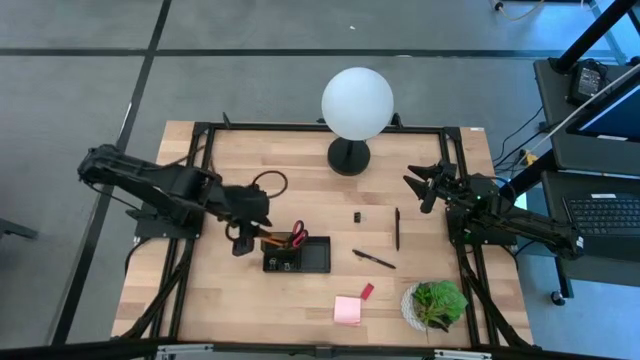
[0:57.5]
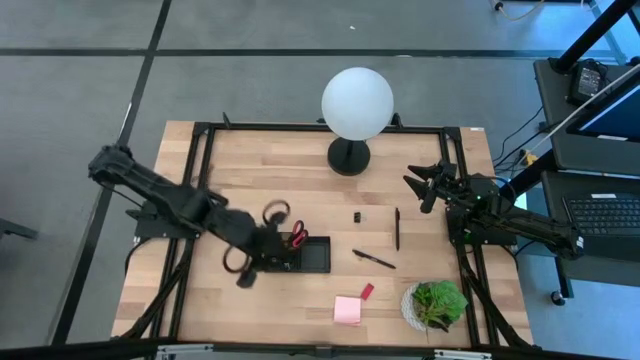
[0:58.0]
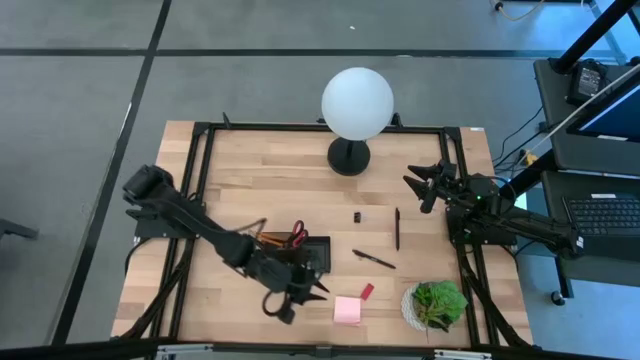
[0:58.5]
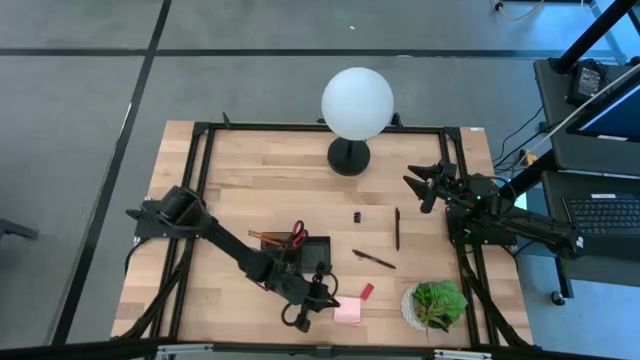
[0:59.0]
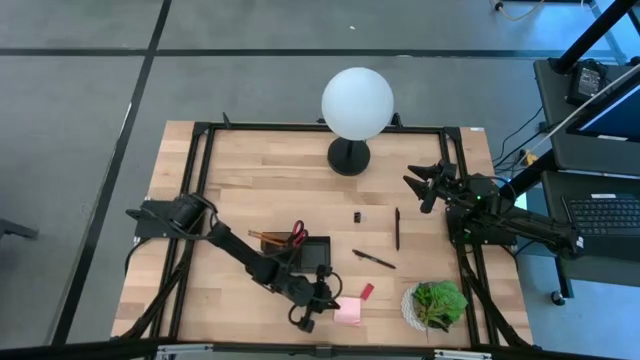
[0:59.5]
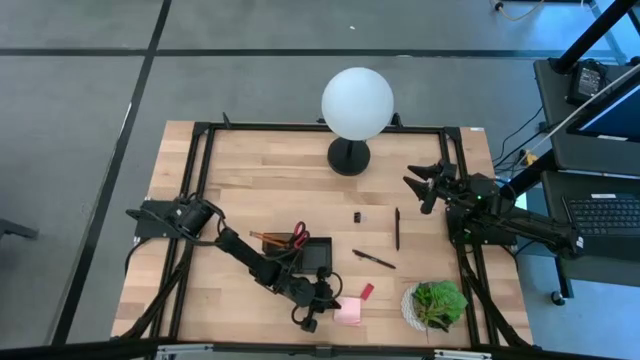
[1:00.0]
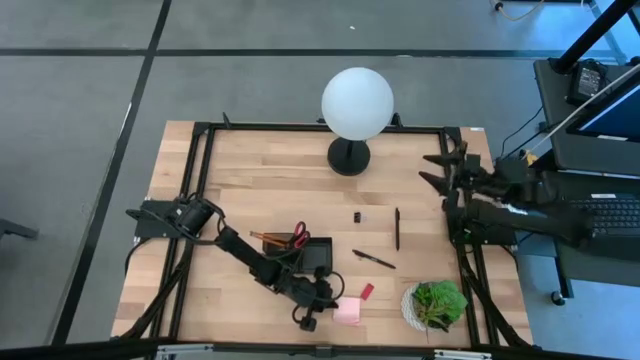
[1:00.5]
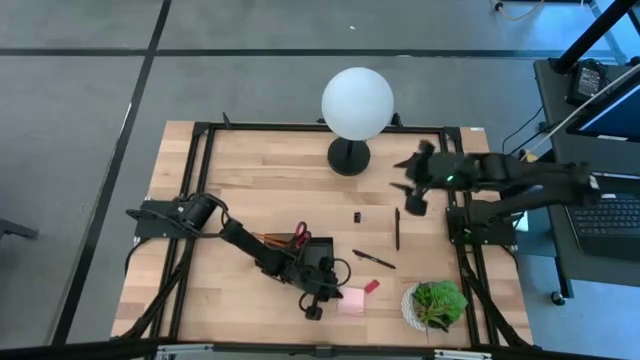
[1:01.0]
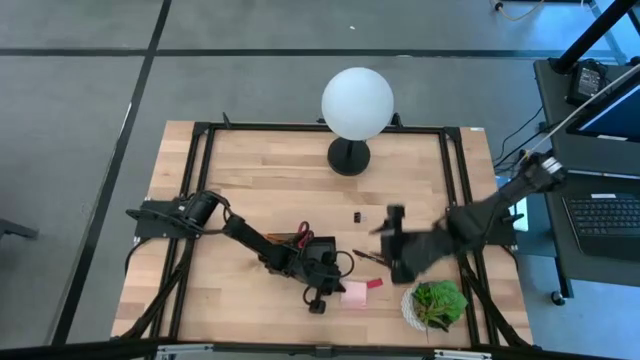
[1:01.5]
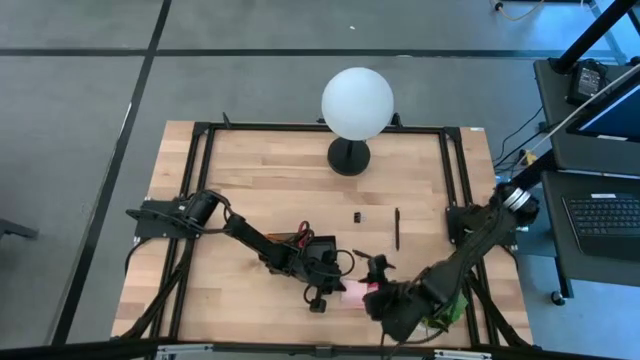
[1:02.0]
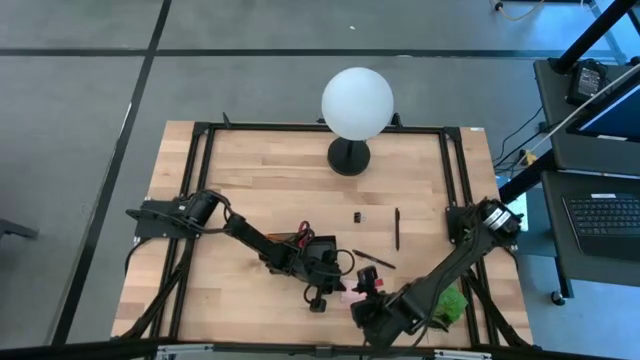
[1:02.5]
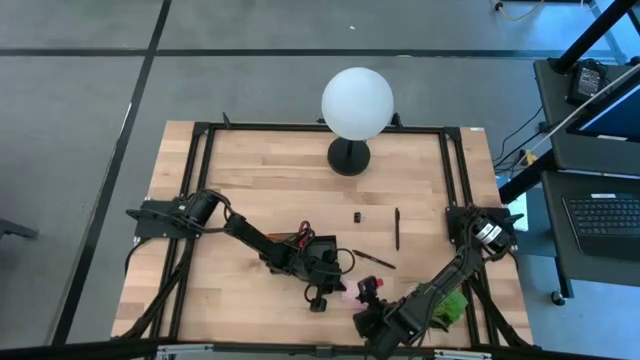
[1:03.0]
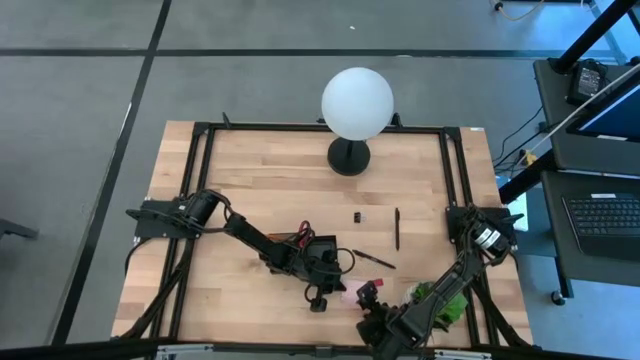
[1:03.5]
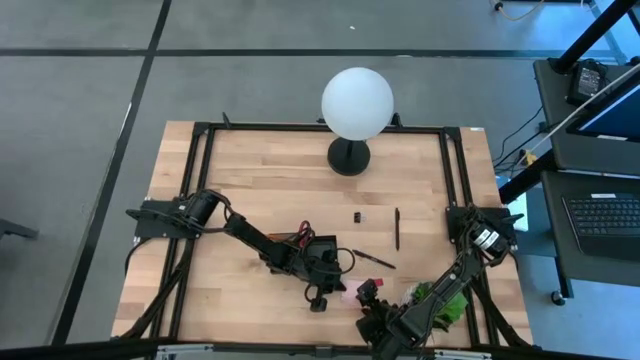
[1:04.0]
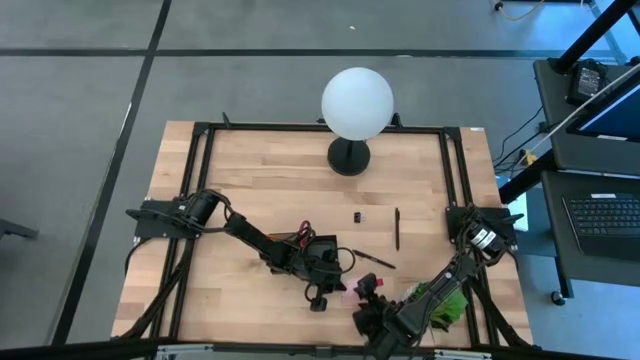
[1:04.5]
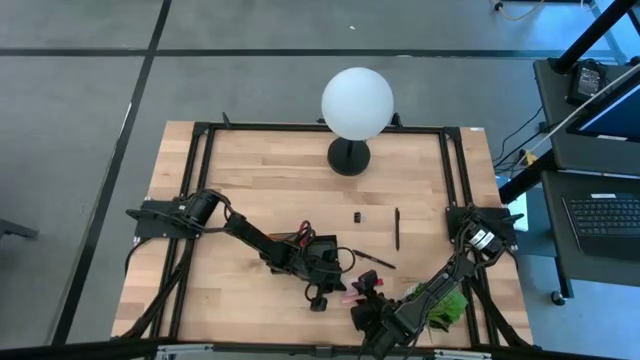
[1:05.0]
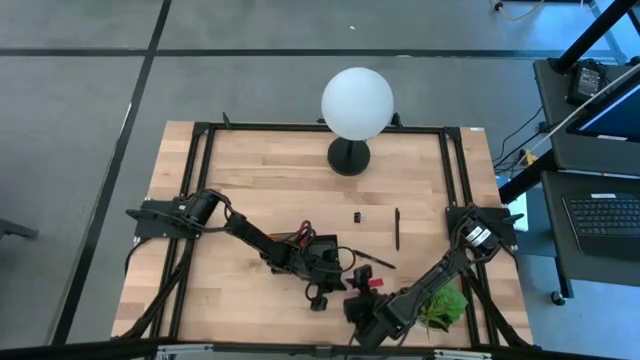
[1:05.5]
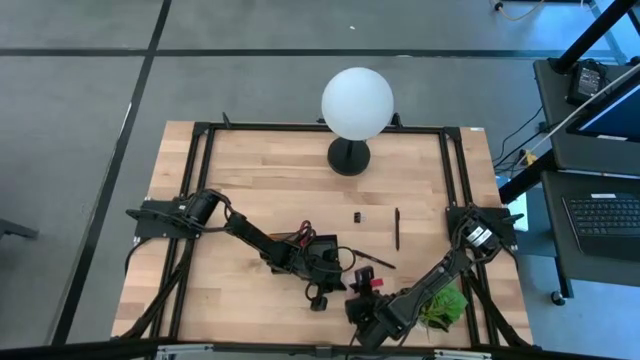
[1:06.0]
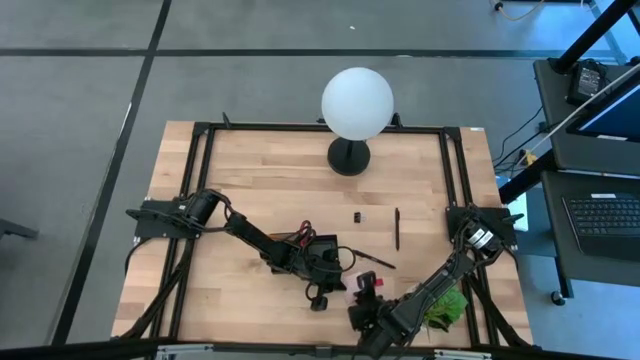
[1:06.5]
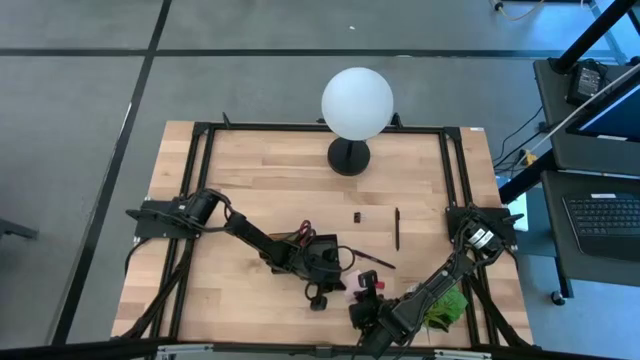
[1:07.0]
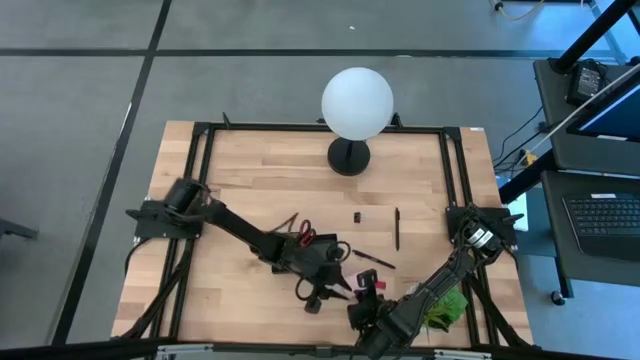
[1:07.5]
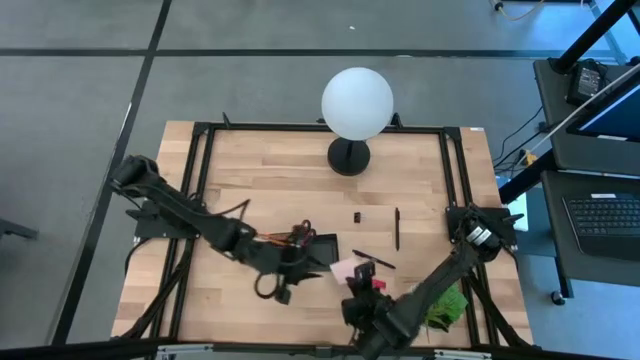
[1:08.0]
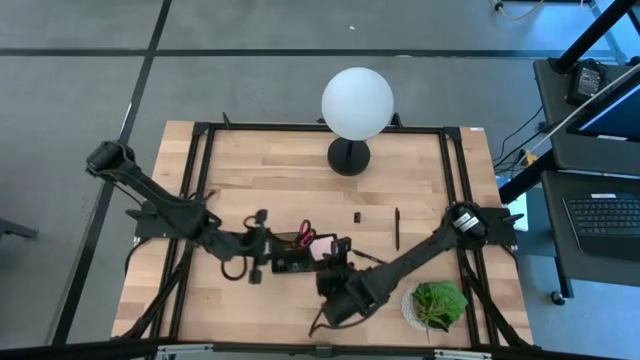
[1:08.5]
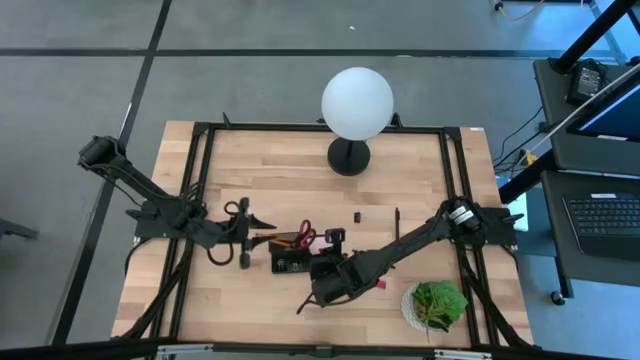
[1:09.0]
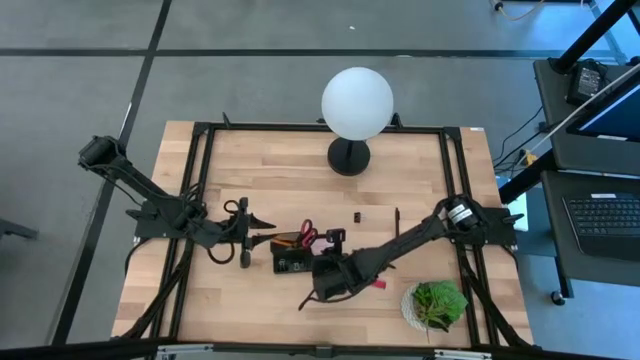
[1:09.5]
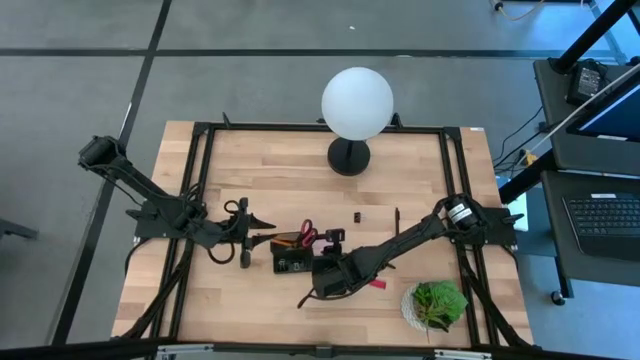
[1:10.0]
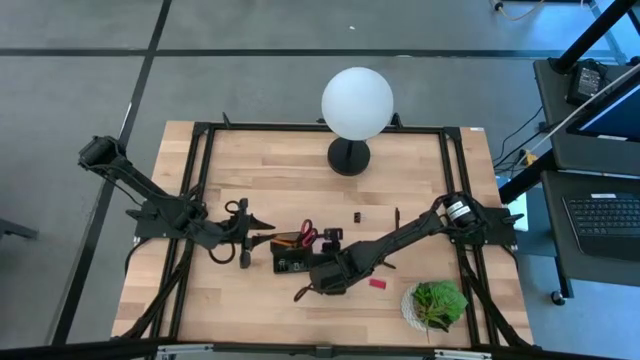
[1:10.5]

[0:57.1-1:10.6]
Task: Pick and place office supplies into organizer
Put the pink sticky notes into the black desk organizer

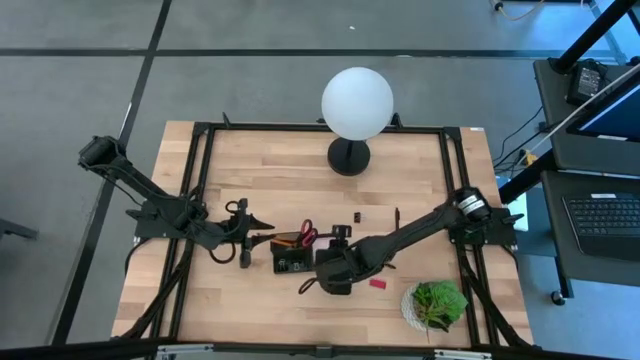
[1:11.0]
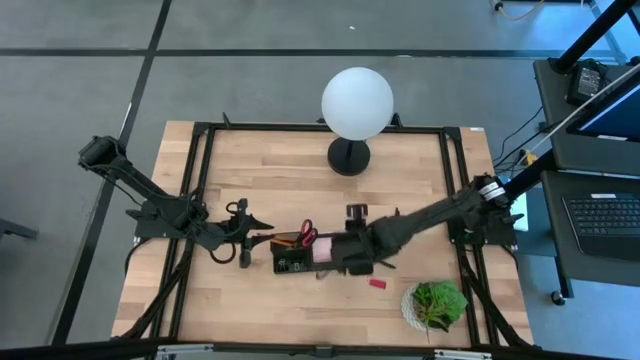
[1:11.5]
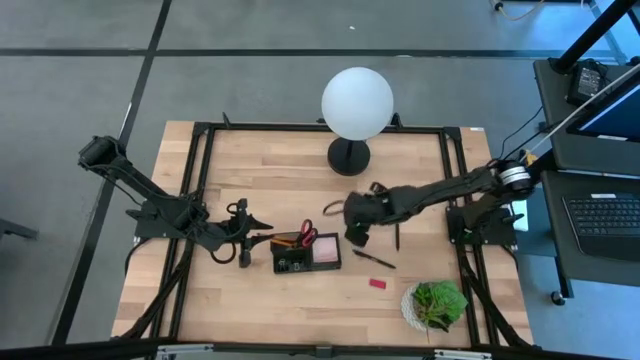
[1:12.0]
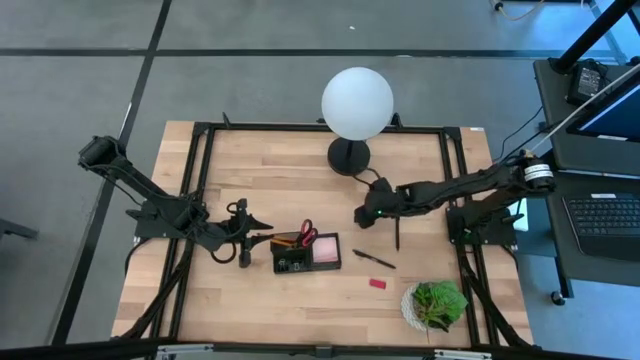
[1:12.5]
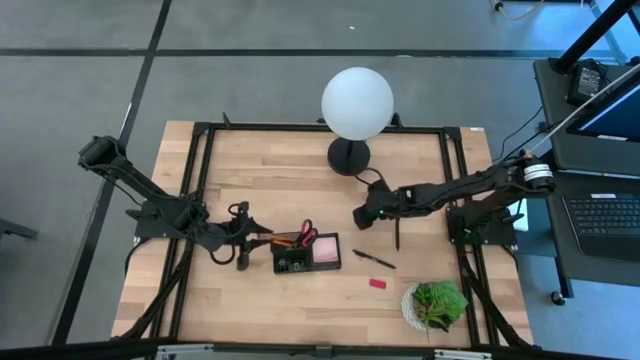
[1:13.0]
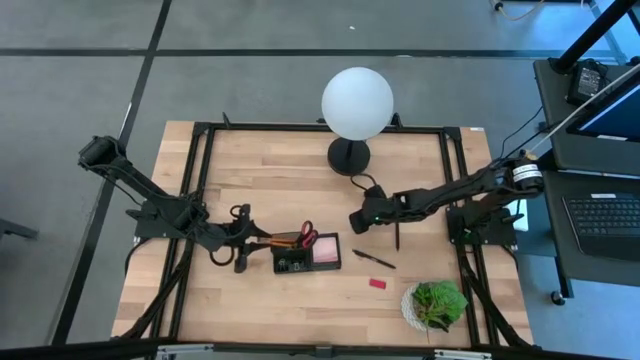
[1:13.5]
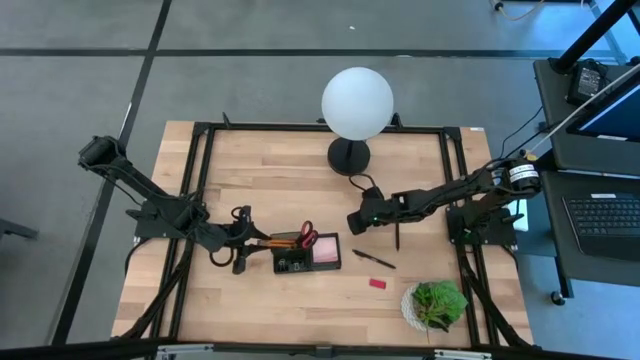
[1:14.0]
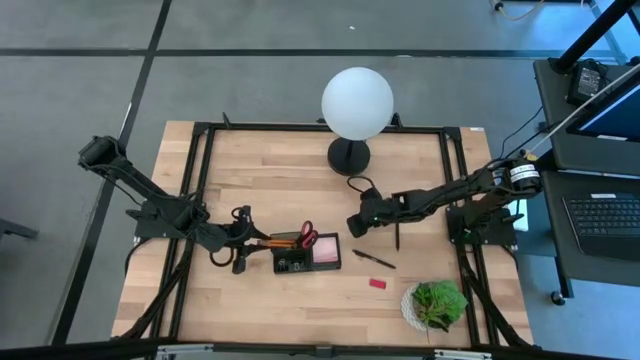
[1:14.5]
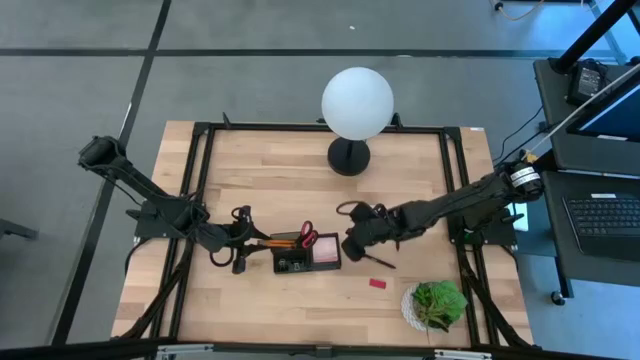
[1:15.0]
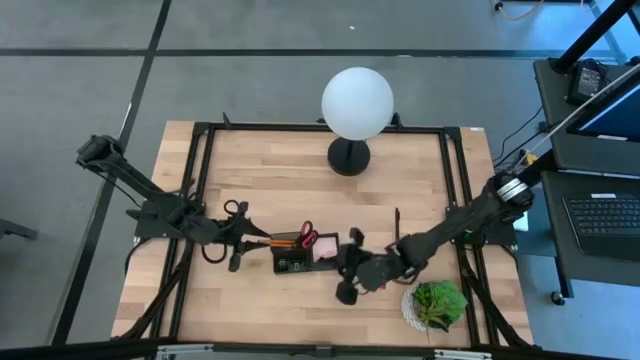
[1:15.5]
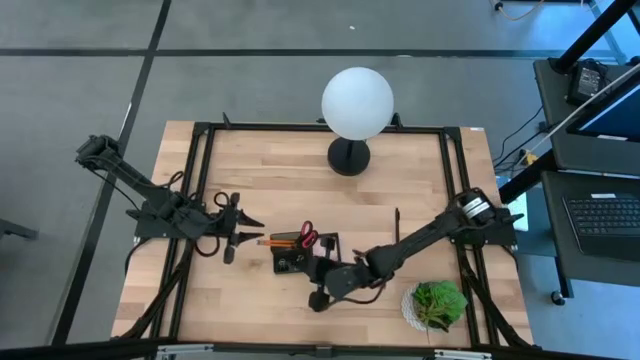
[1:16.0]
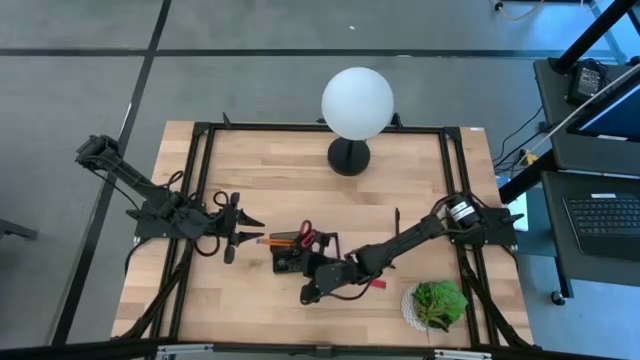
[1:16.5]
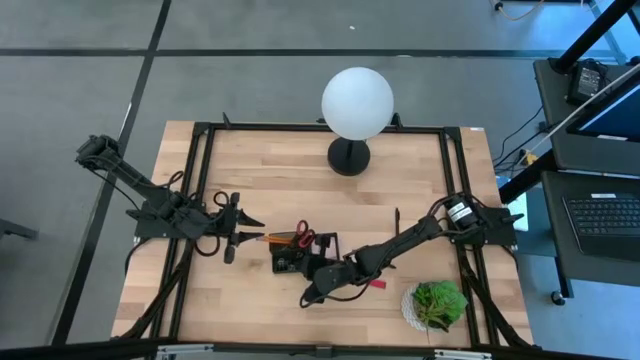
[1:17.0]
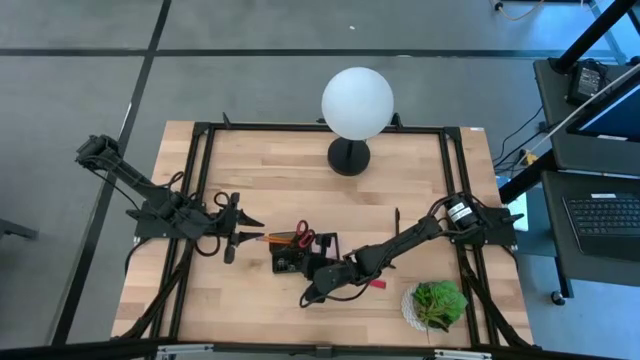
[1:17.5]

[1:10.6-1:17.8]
Put the black binder clip into the black desk organizer

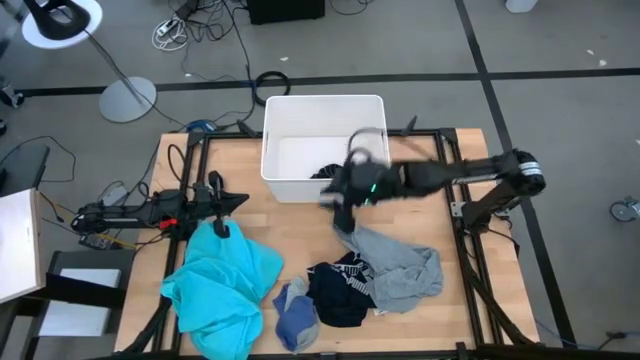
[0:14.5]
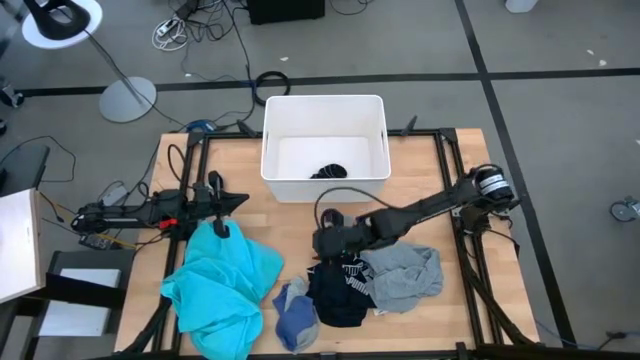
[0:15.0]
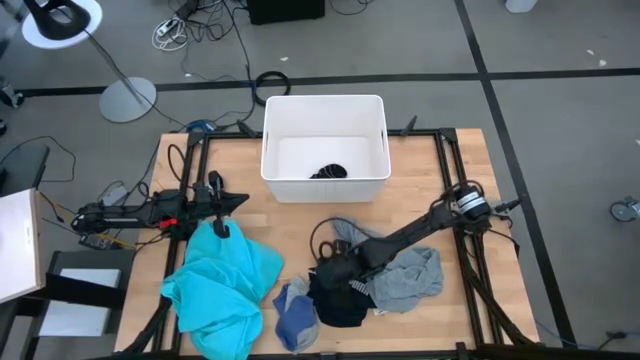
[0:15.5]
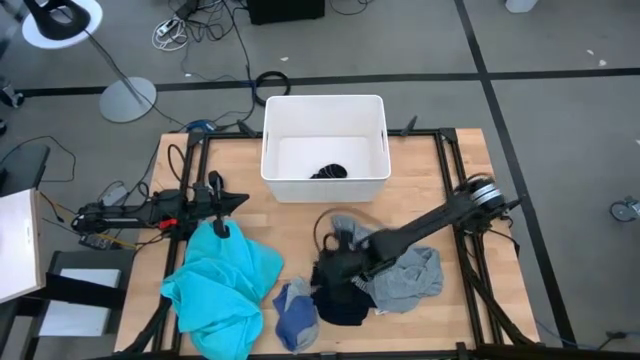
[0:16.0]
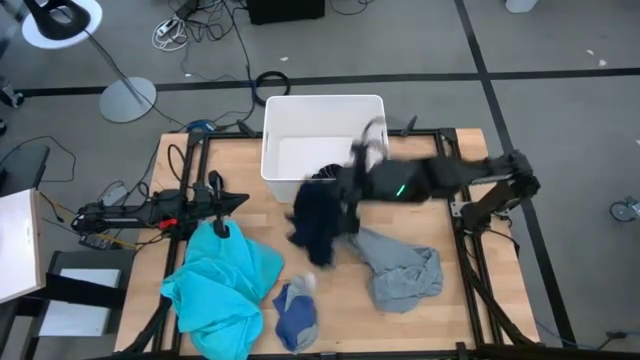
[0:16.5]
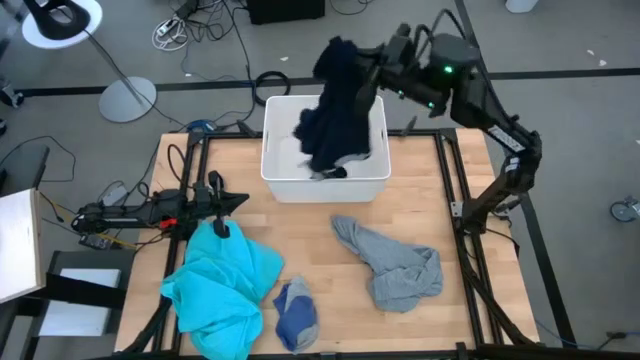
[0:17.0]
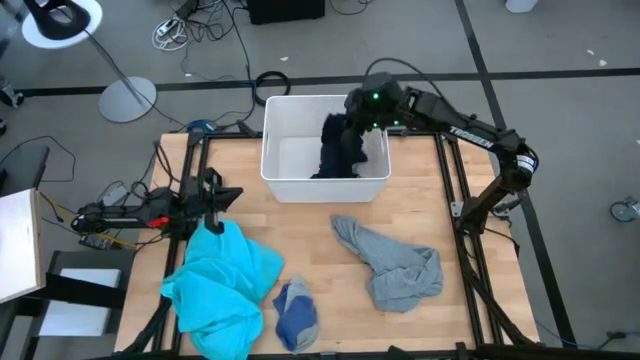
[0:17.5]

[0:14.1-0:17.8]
Task: Sort clothes
Put the dark blue boxers into the laundry bin
